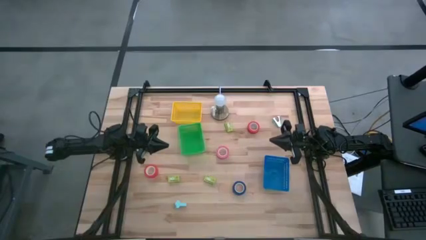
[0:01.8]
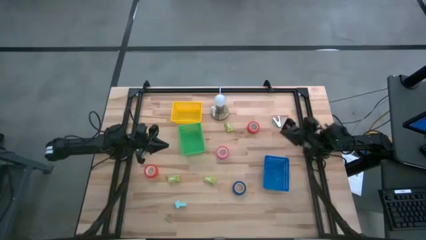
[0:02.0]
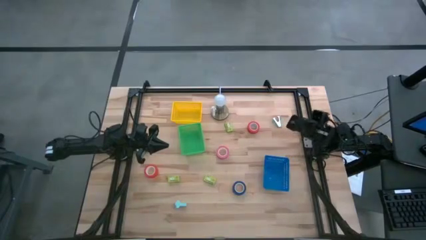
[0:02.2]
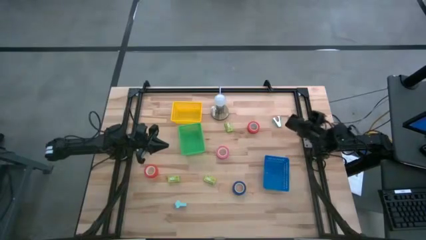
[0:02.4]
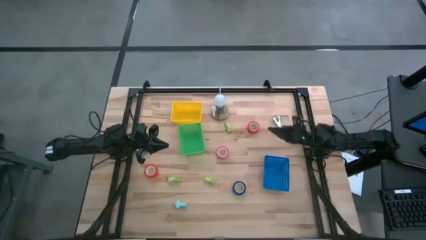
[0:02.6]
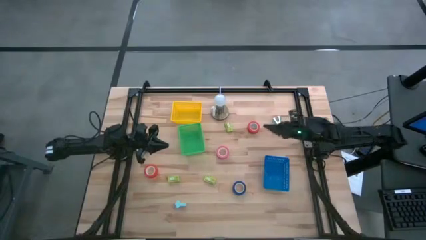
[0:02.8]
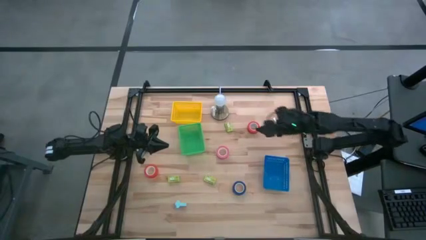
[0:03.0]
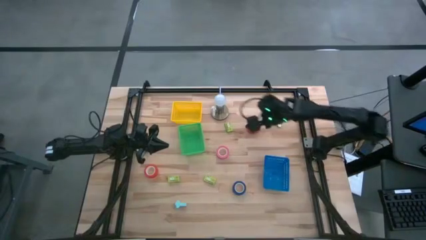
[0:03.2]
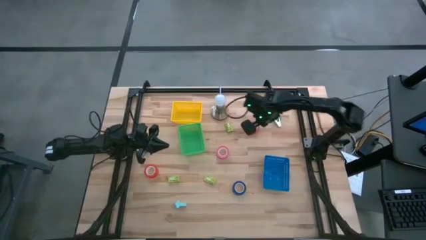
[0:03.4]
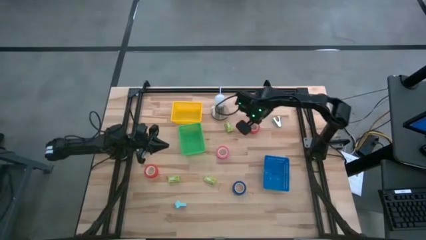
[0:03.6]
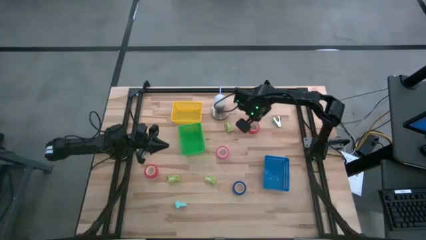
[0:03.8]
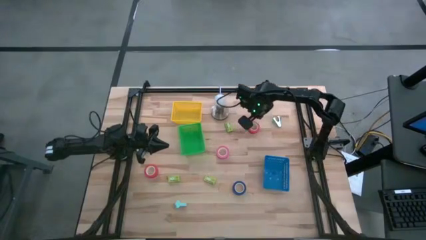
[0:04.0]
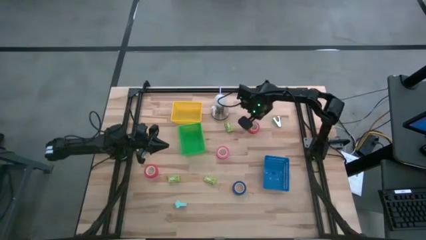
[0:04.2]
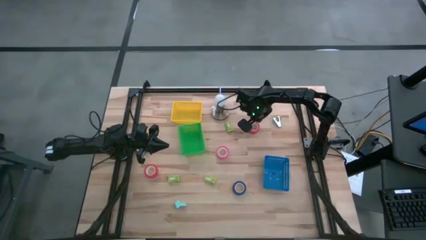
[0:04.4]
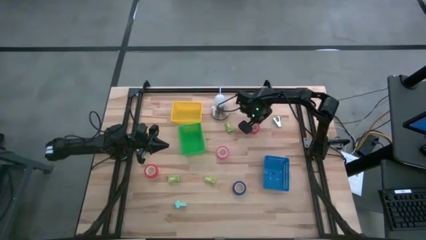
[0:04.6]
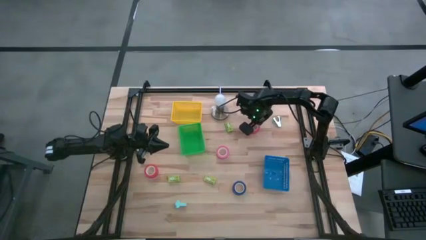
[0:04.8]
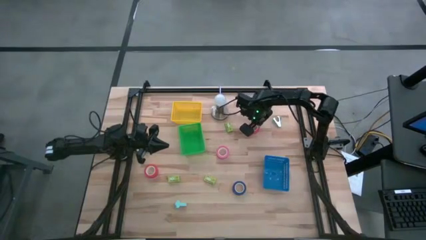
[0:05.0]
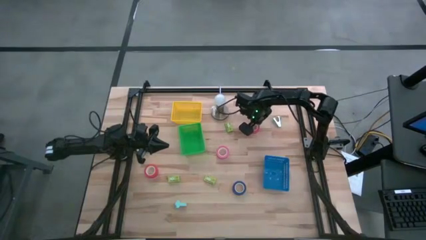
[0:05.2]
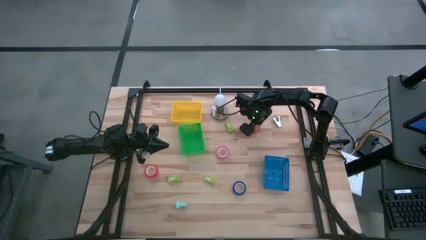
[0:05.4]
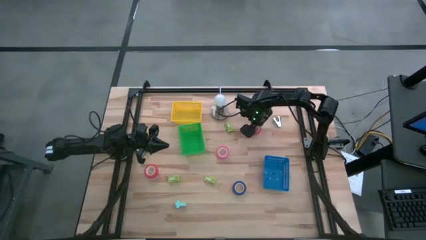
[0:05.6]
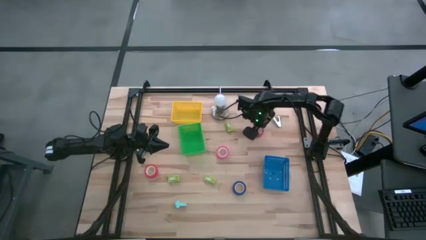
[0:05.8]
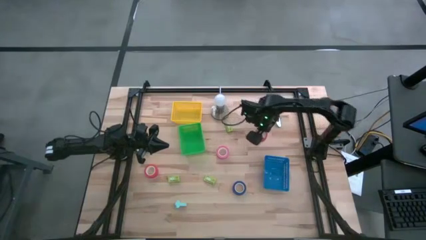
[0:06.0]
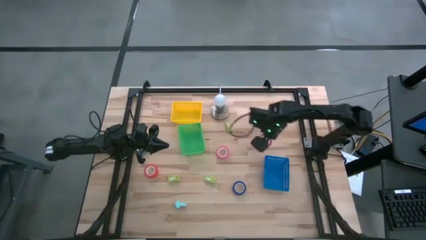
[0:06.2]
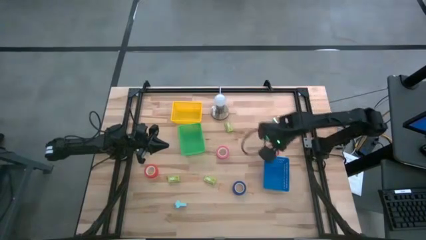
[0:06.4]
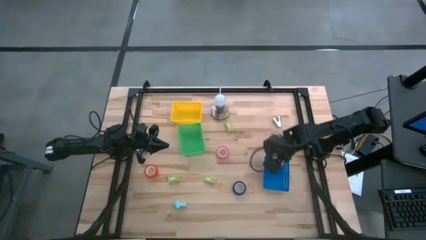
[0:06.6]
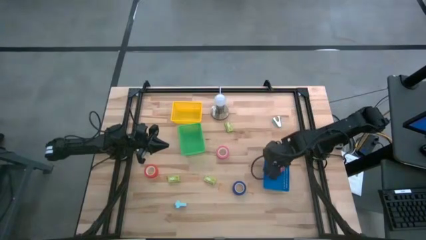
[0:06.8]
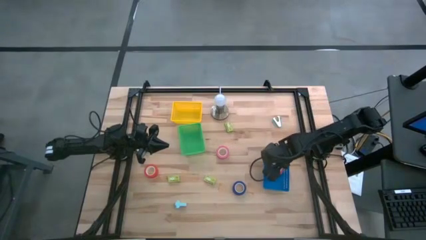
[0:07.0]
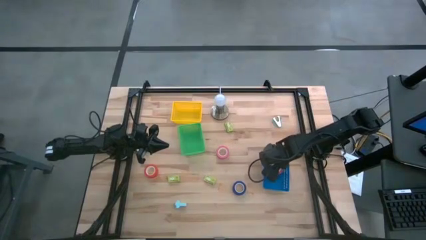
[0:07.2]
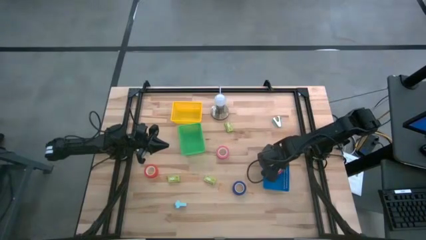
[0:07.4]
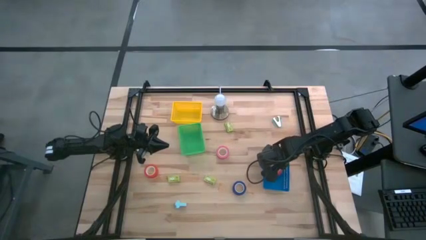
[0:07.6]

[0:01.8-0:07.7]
Task: Pick and place Stapler, Stapler remover, tape
Put the orange tape into the blue bin

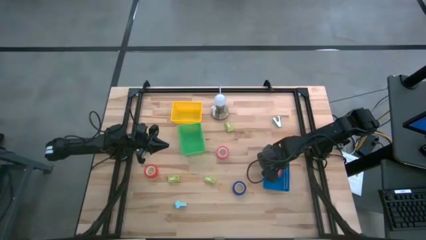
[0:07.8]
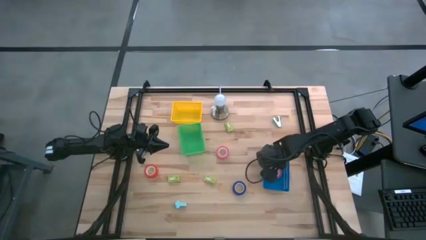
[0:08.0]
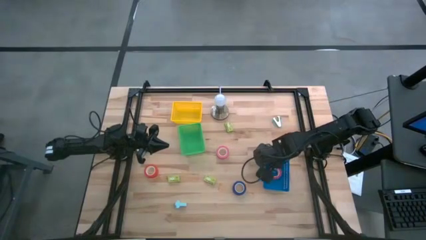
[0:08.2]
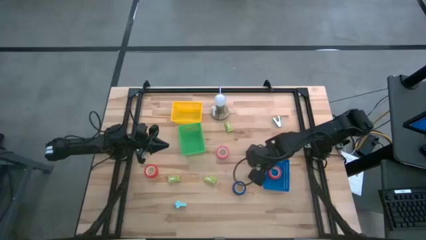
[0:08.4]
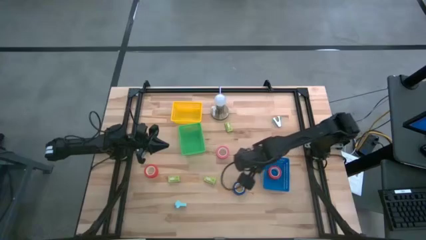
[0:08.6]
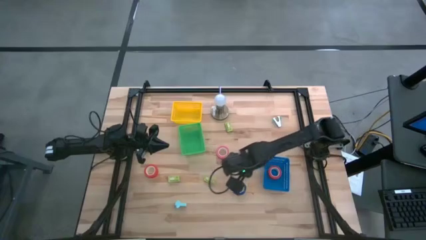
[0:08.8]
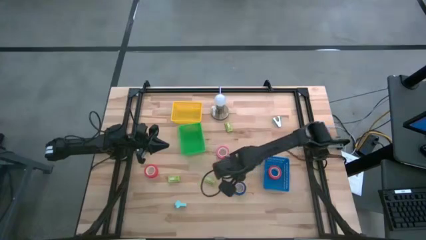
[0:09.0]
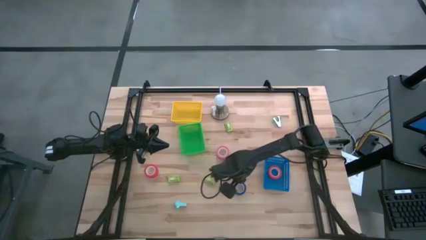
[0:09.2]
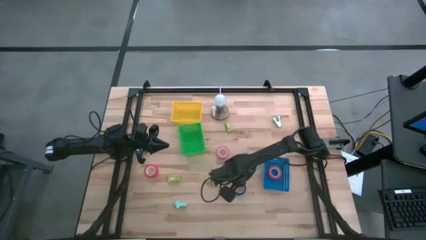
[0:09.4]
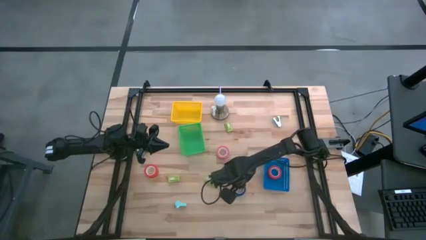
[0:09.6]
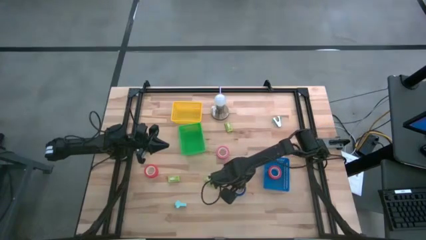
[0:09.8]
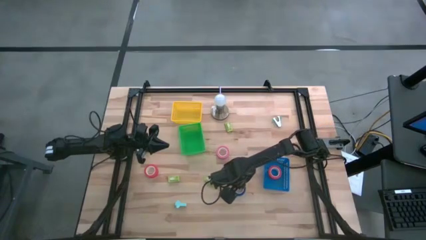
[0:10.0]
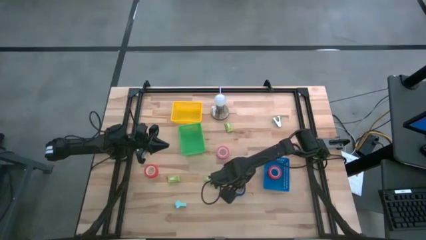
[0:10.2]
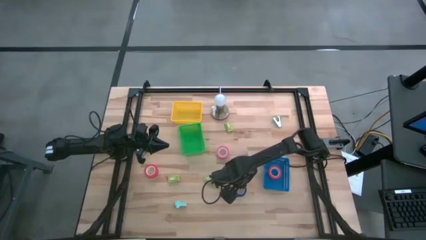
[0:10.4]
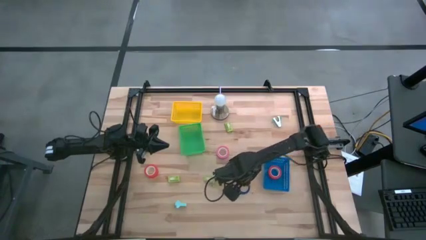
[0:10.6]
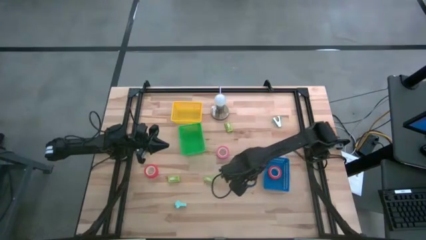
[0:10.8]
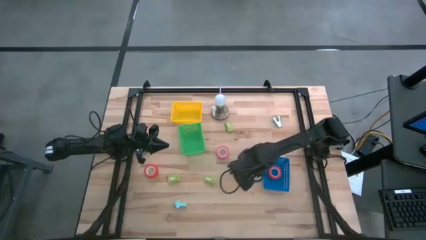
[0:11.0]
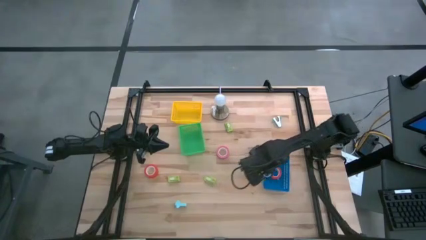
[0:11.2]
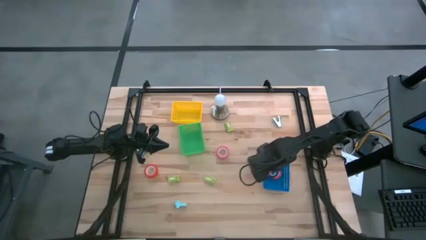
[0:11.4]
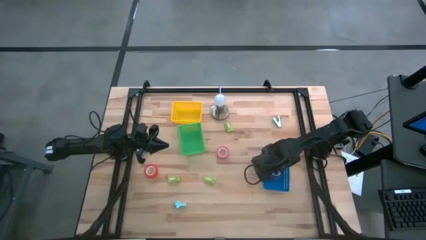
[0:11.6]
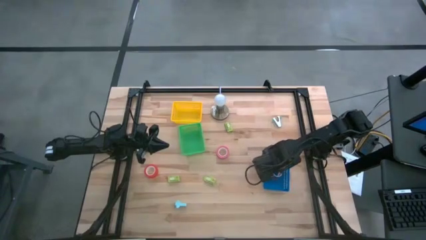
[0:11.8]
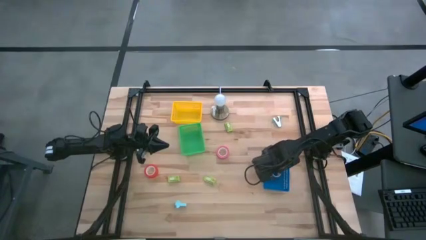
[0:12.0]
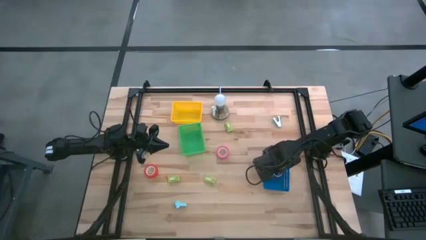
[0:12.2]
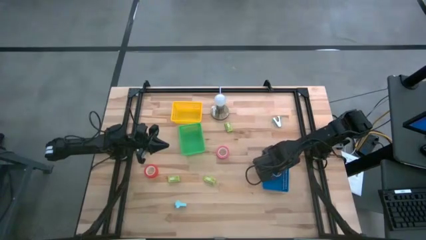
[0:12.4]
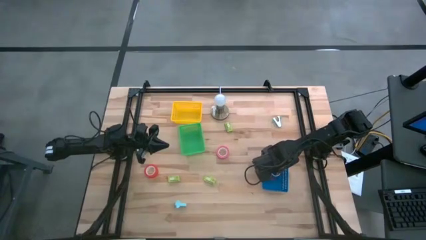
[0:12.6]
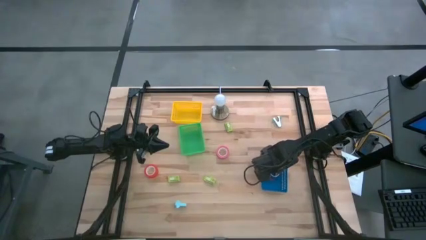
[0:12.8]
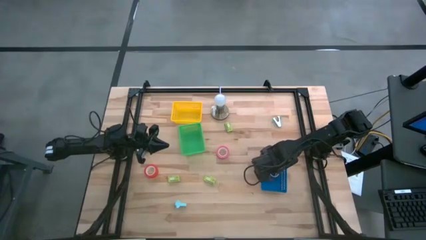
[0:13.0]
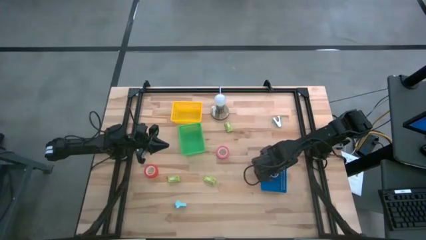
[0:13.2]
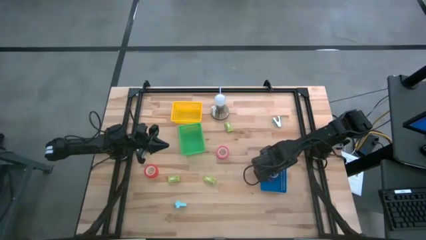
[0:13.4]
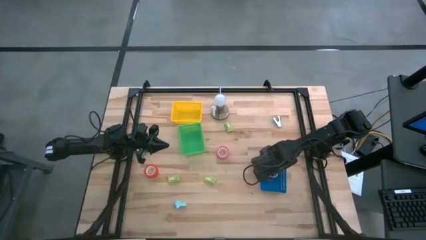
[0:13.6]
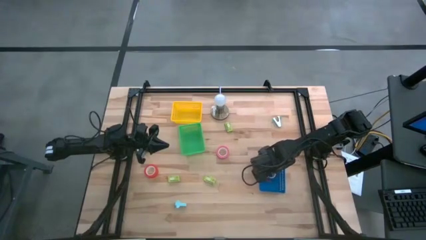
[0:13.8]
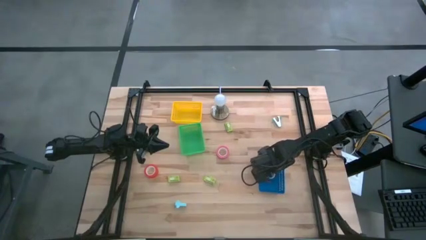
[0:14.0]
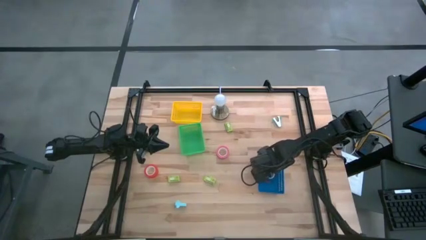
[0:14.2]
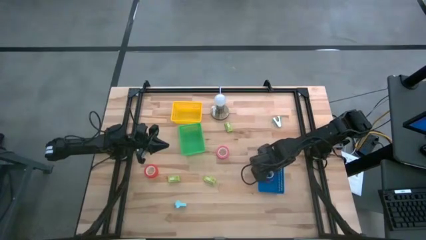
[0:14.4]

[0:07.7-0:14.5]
Put the blue tape into the blue bin

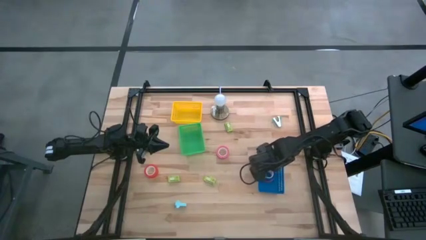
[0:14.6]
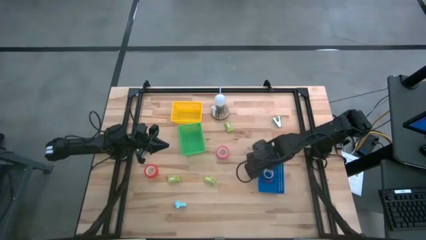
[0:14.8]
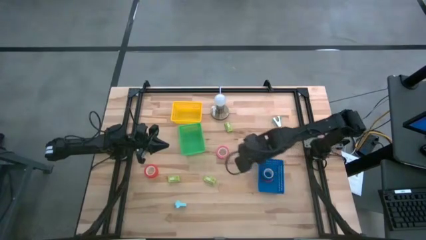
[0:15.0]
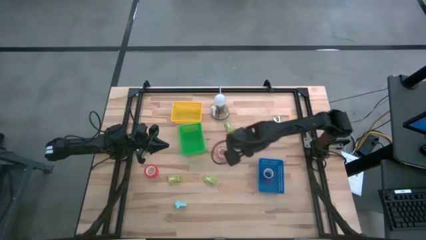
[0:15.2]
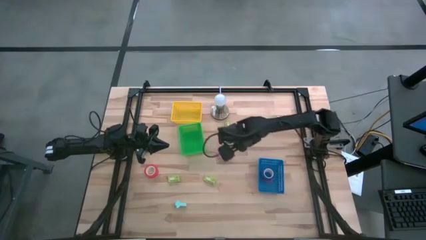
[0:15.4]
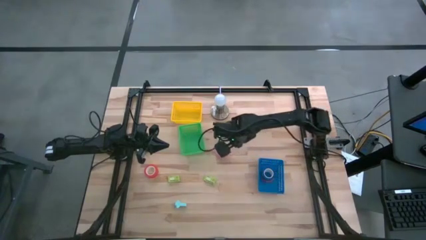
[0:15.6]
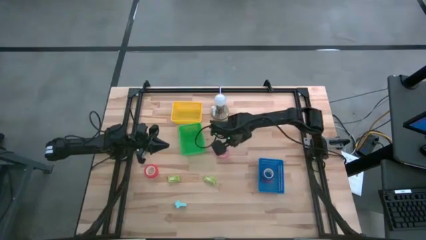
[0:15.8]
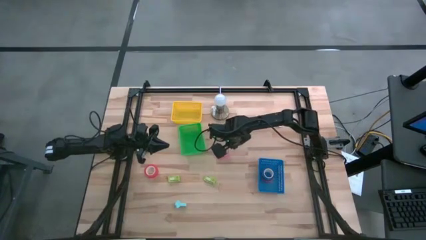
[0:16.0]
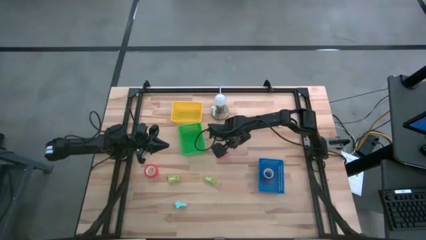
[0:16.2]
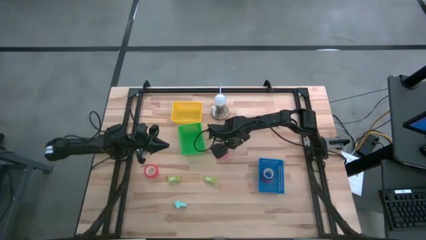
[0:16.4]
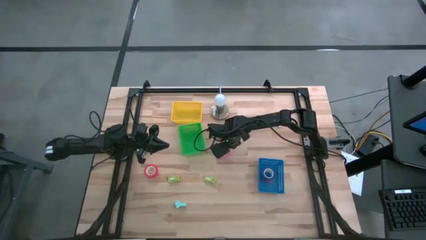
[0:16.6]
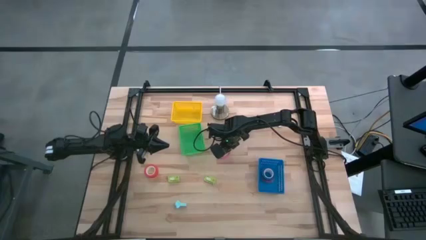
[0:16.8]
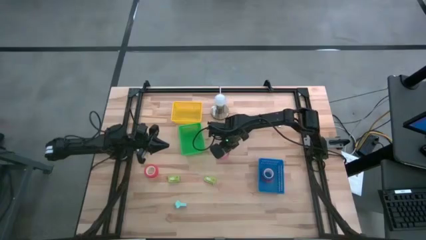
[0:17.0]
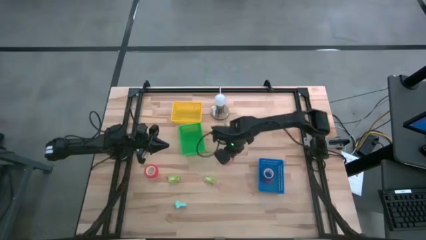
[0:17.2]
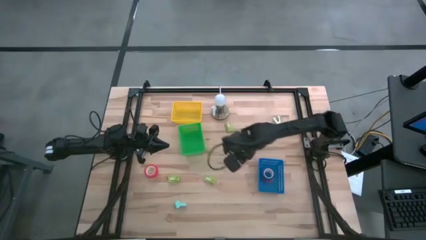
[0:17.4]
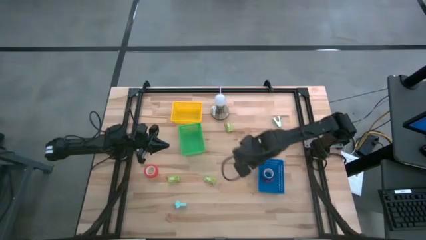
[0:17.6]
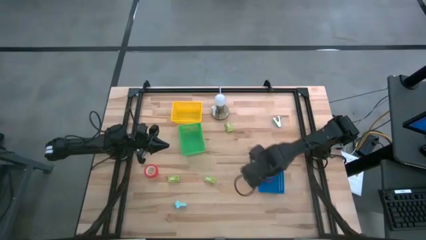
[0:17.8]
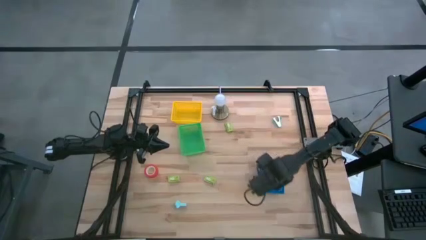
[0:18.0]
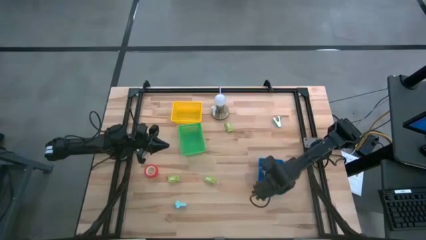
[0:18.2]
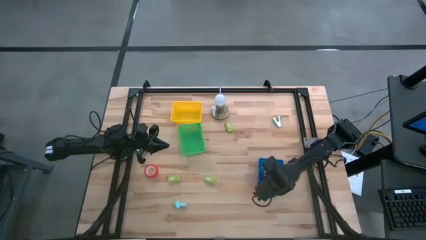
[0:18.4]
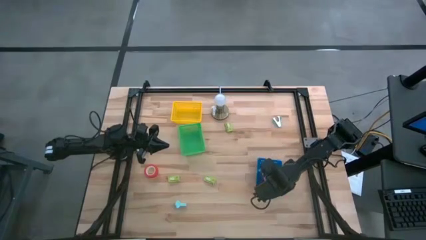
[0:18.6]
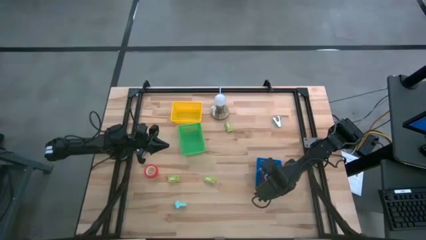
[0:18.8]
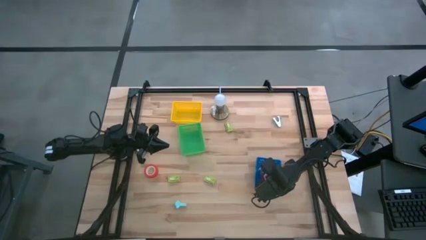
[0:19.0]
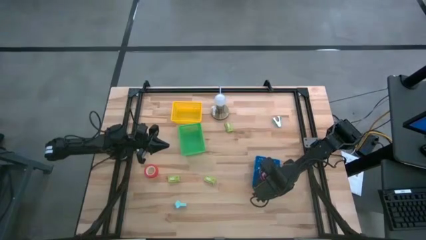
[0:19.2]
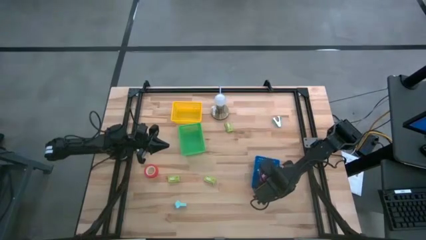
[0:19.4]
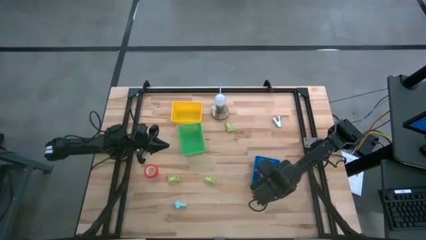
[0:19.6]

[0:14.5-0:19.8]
Put the pink tape into the blue bin
